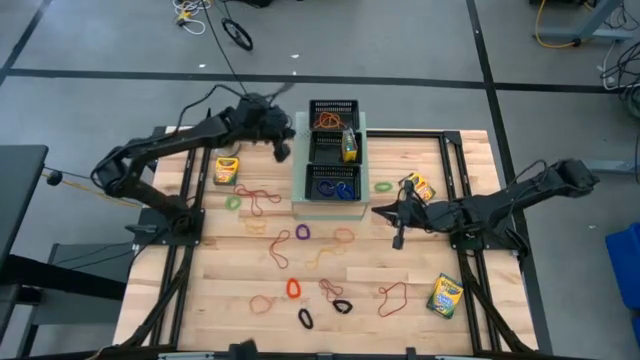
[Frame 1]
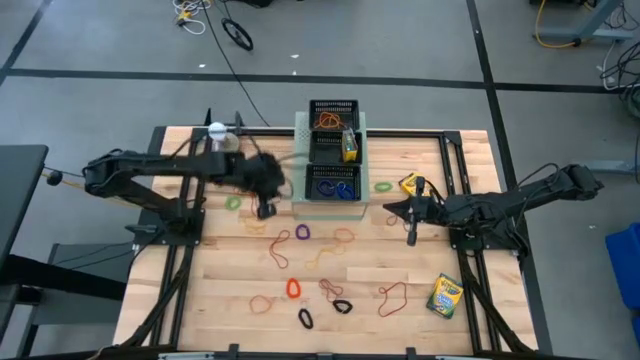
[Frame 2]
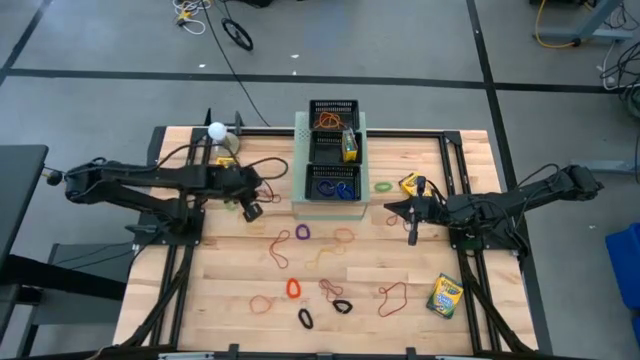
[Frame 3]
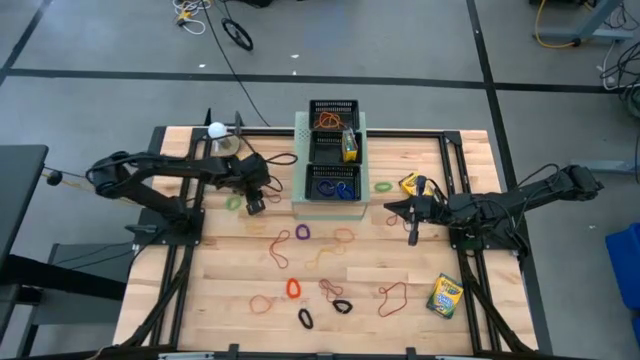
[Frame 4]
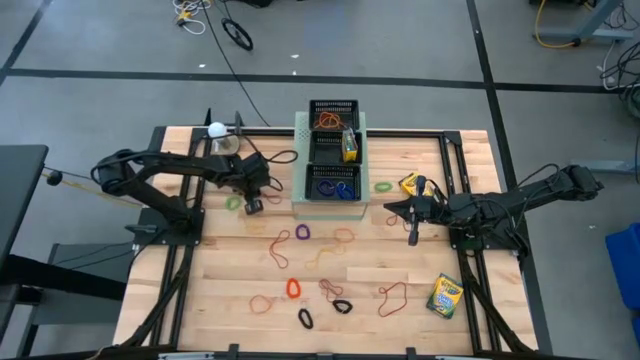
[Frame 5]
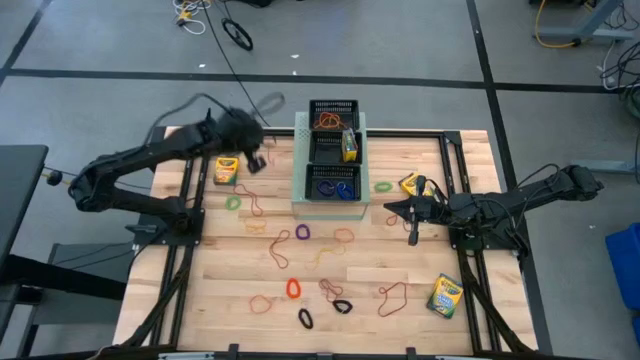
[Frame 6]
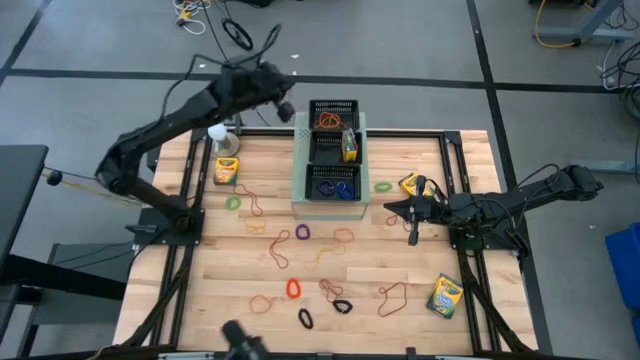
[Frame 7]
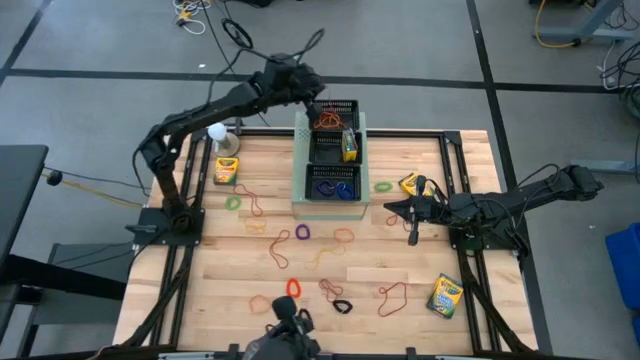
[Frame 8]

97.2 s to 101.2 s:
Task: Pick & Place Office Desk Supplies
Put the red rubber band into the top black bin on the shelf

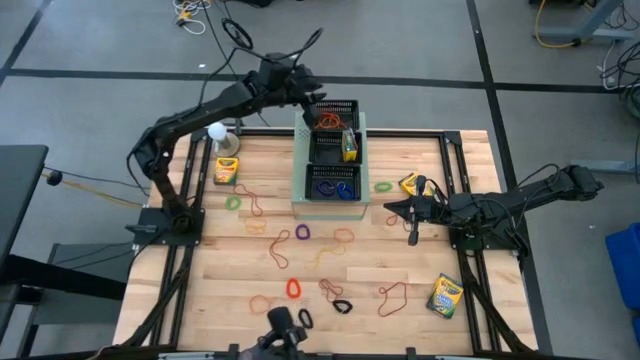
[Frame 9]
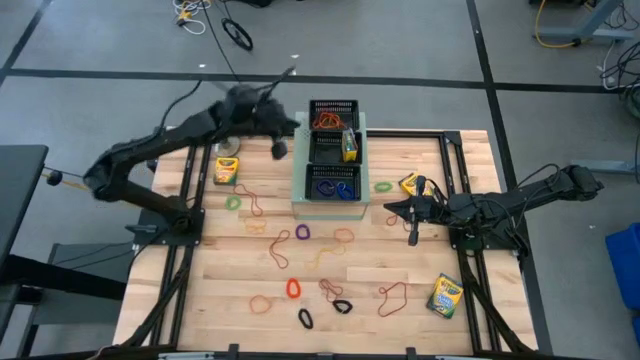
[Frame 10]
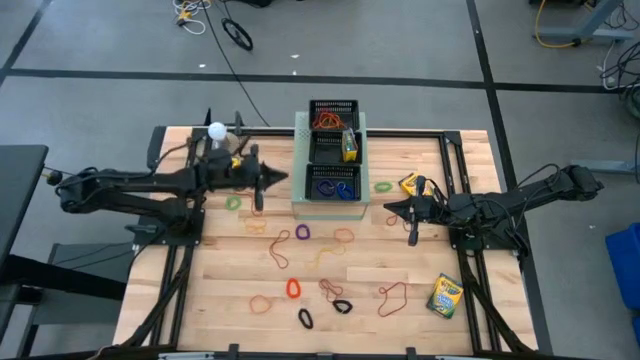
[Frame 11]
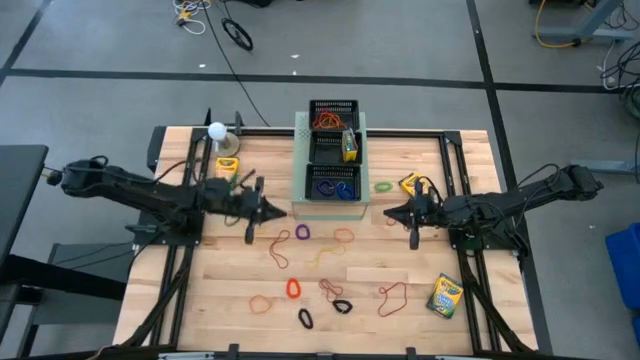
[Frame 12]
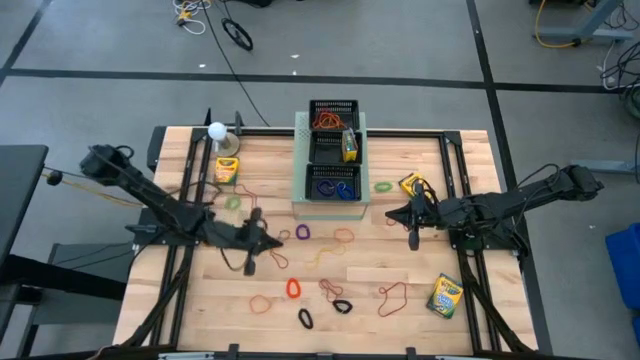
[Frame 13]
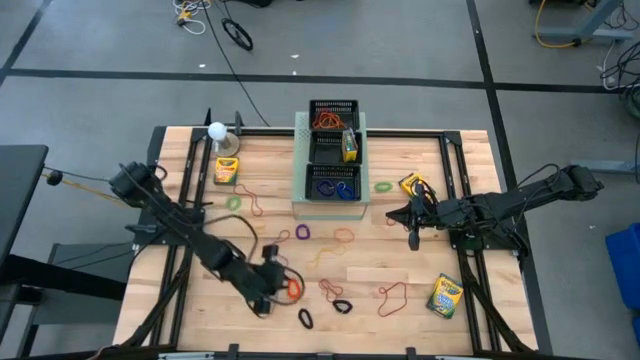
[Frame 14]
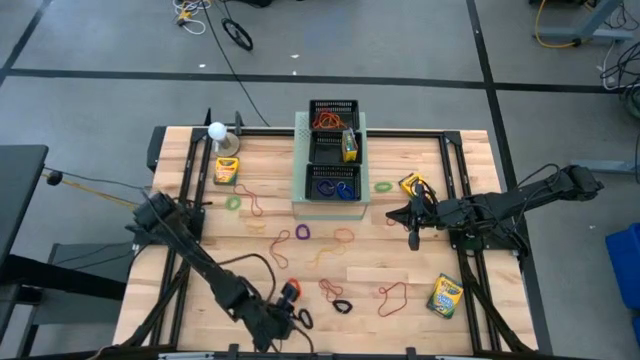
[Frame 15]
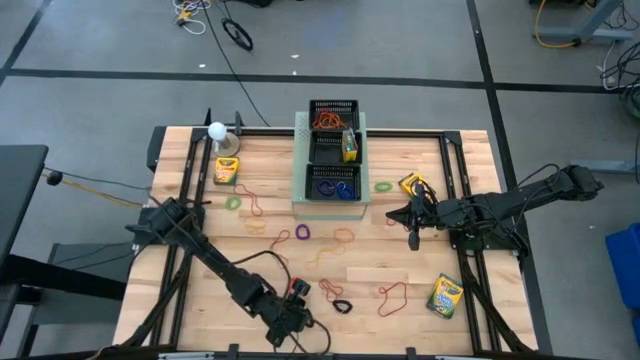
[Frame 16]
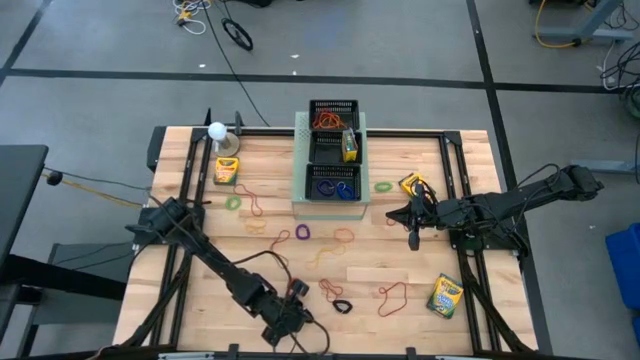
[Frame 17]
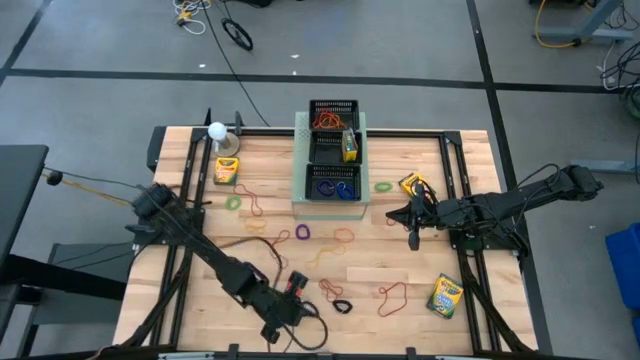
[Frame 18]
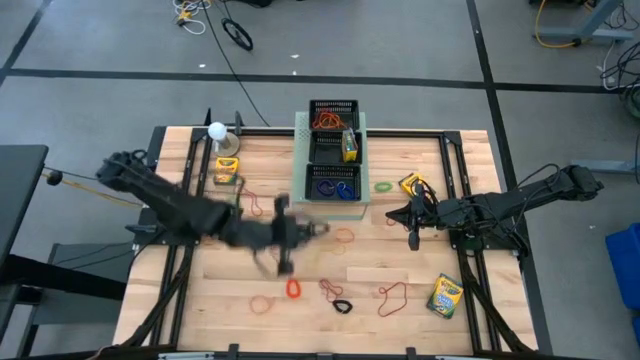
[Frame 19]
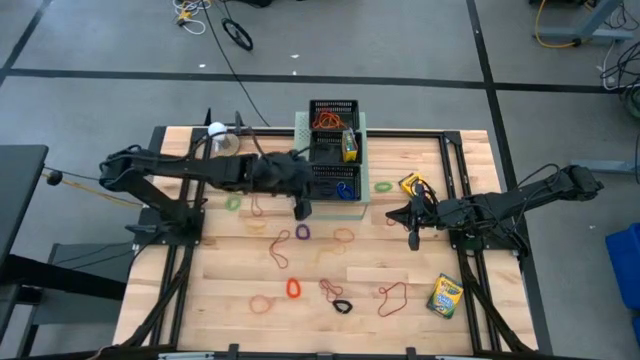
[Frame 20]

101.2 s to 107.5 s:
Put the left black spring keychain into the bottom black bin on the shelf

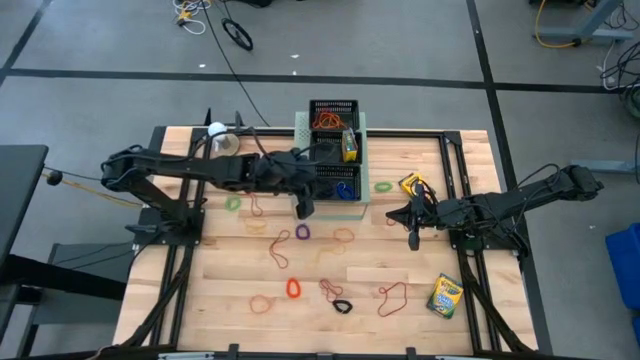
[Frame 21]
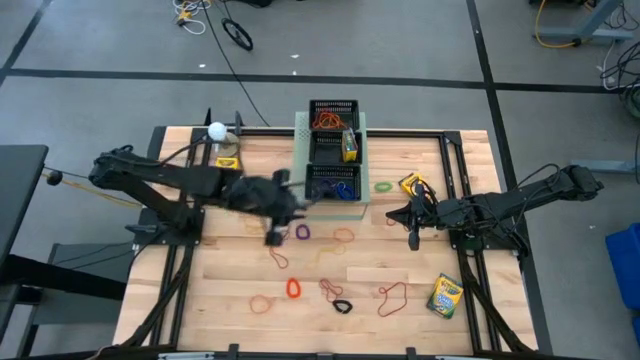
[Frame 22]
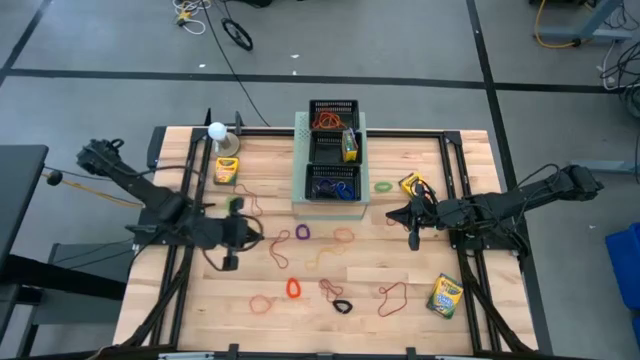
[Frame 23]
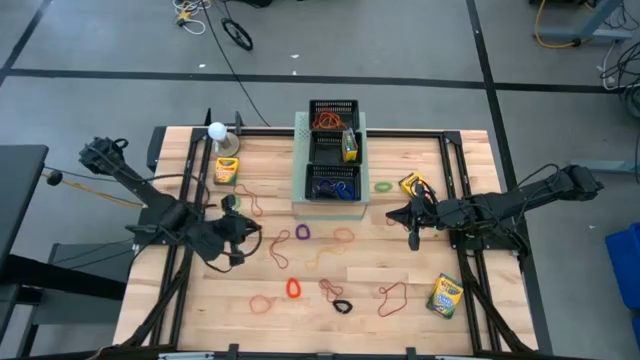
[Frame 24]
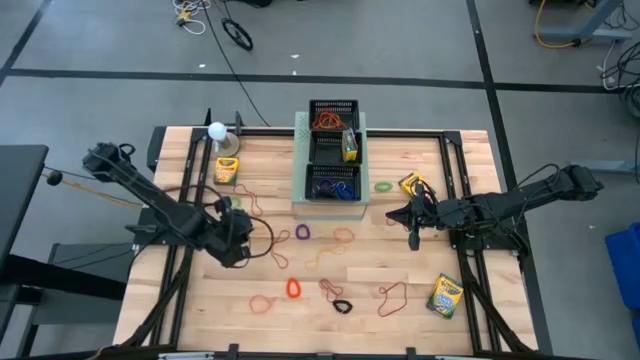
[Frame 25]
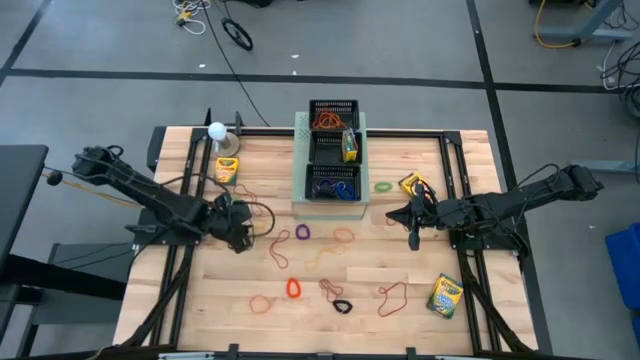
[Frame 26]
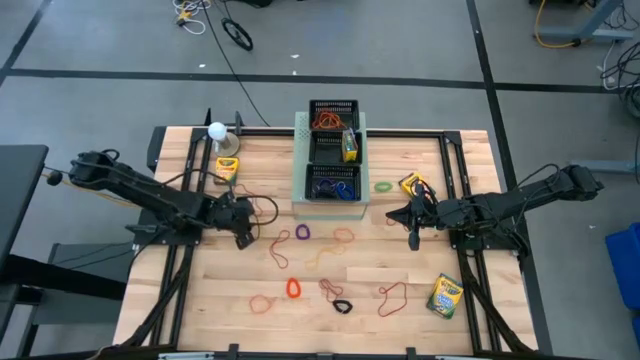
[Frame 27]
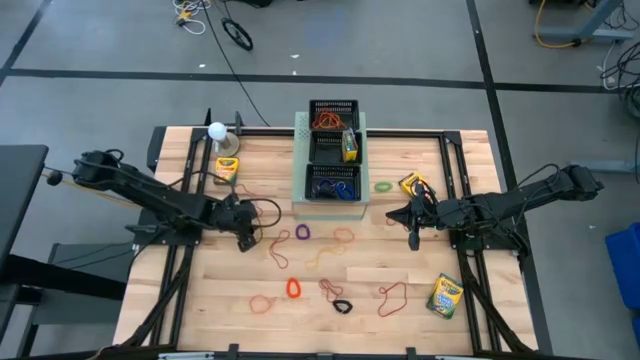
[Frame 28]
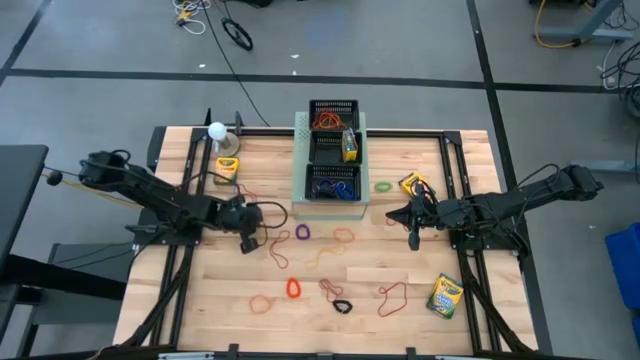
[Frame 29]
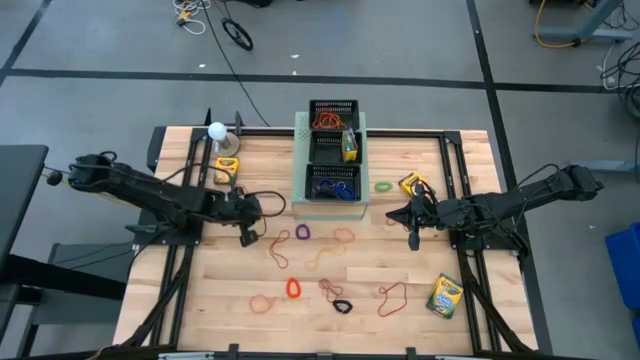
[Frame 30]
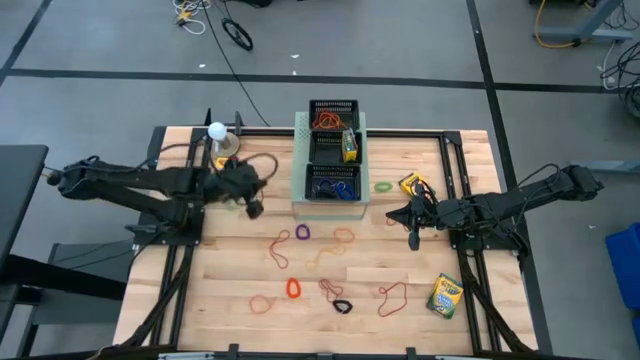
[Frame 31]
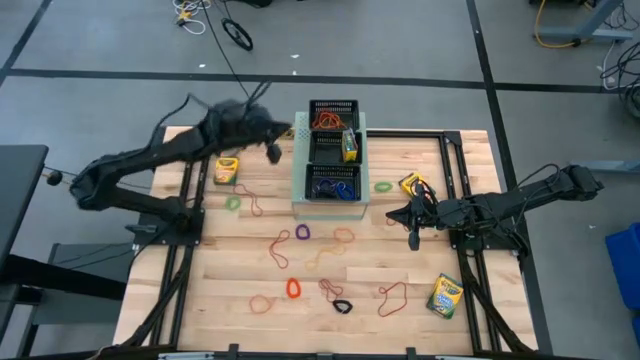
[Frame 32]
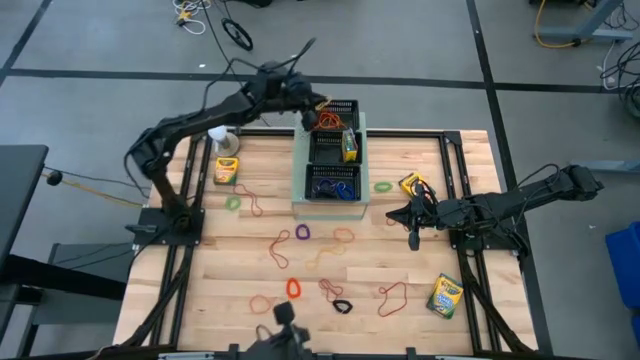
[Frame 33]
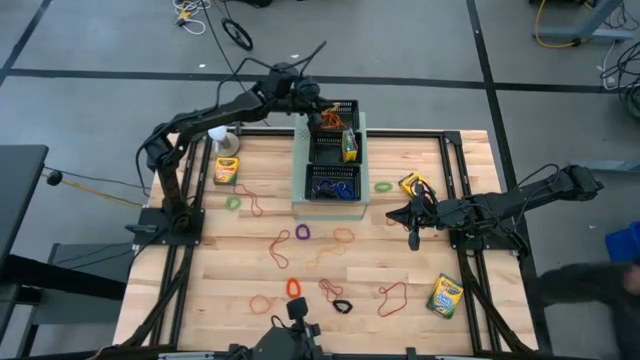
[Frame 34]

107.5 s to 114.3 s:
Put the yellow rubber band into the top black bin on the shelf

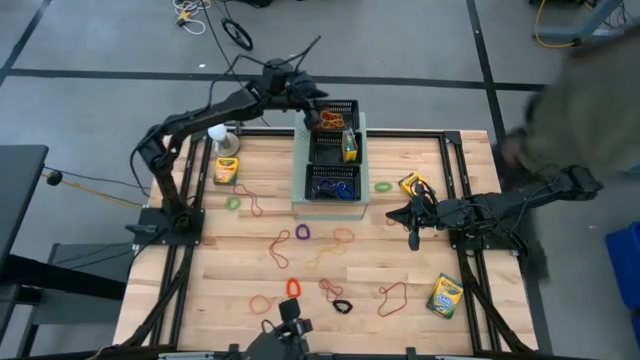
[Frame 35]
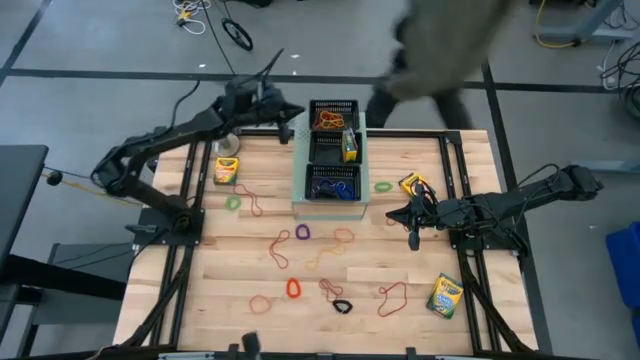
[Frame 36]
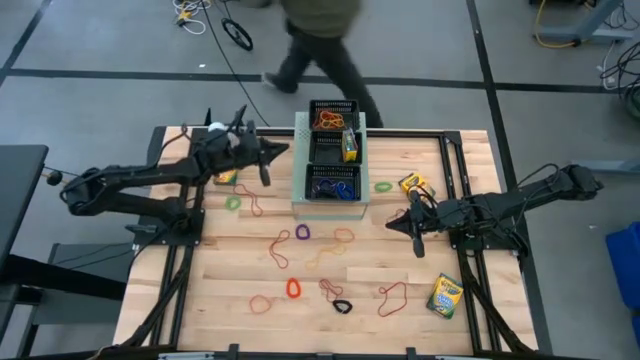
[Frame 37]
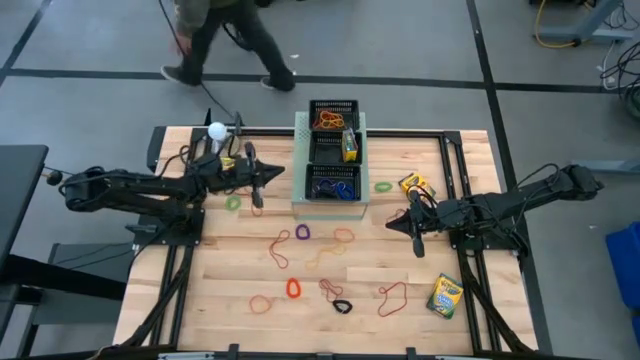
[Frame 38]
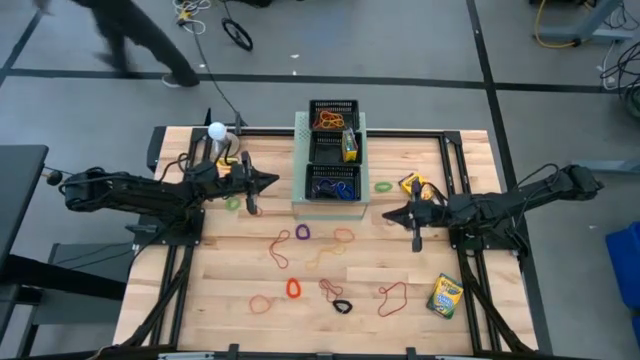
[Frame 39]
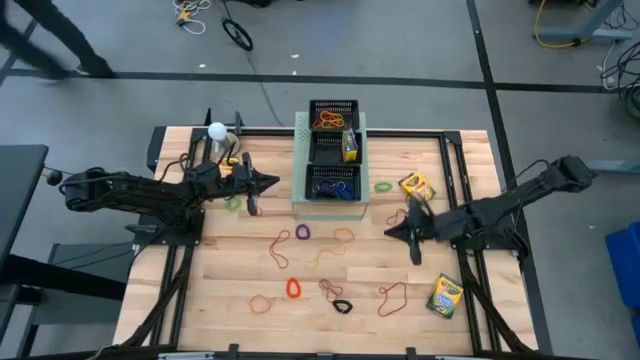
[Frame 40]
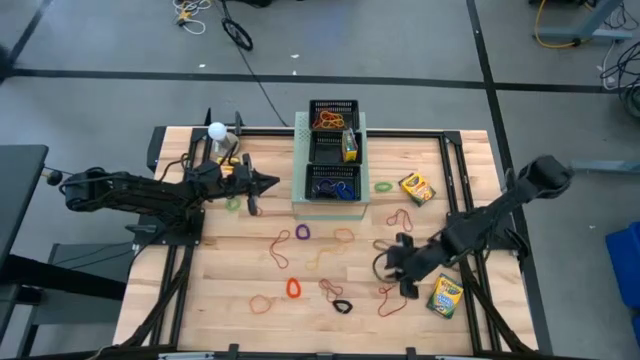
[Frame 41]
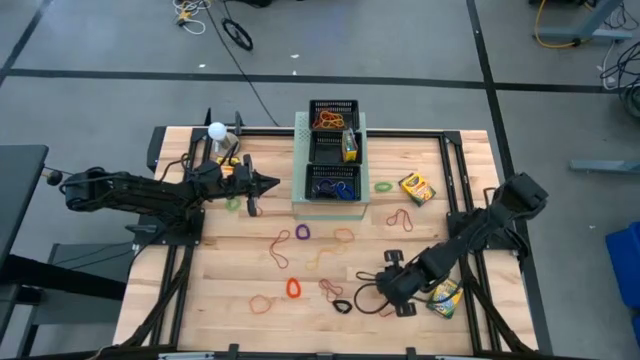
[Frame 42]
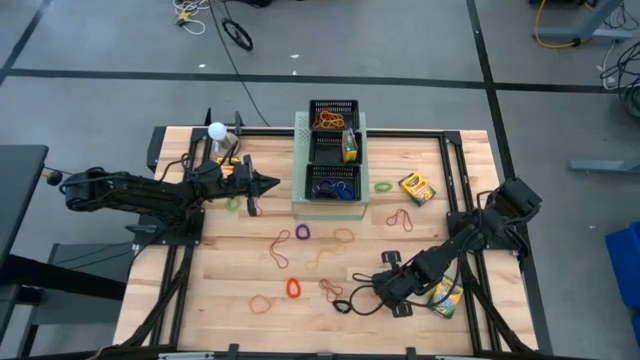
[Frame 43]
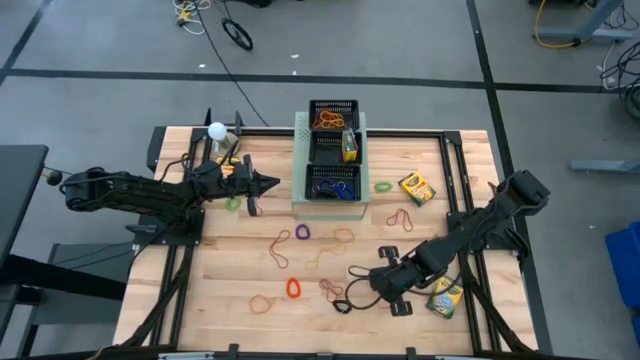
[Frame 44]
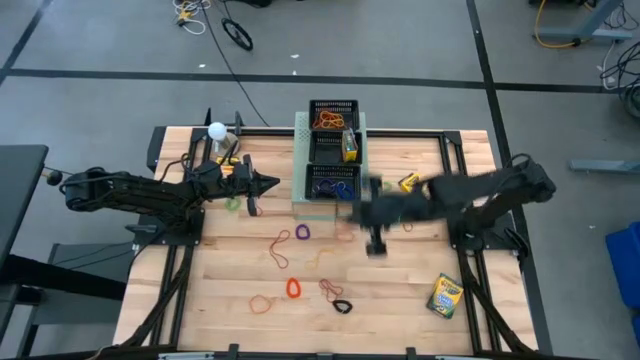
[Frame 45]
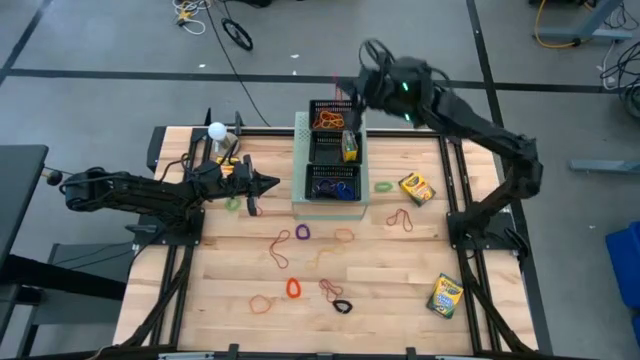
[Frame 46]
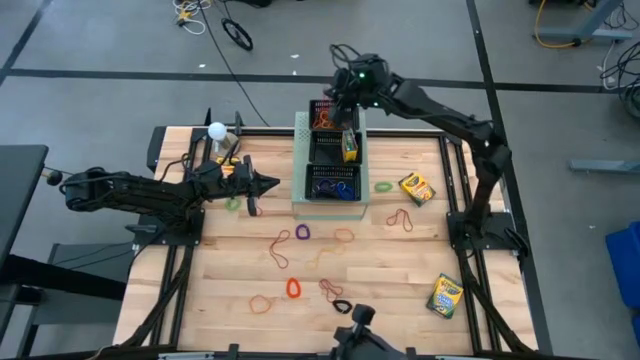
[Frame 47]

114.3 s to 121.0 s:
Put the red rubber band into the top black bin on the shelf
